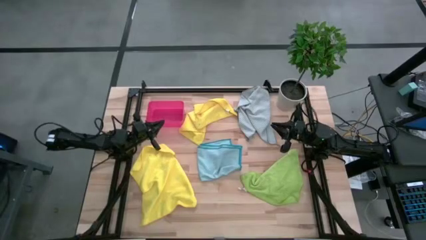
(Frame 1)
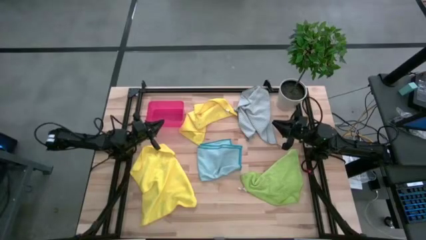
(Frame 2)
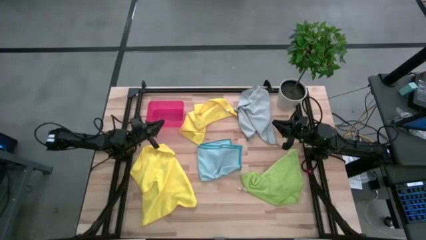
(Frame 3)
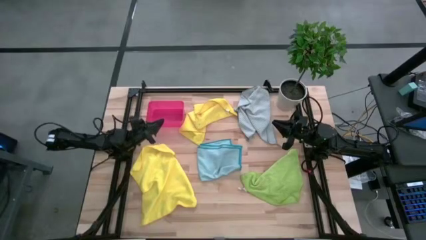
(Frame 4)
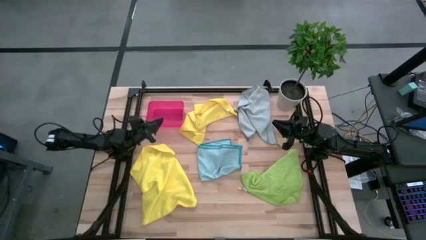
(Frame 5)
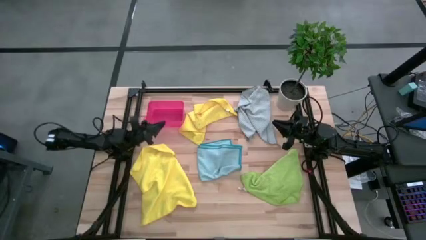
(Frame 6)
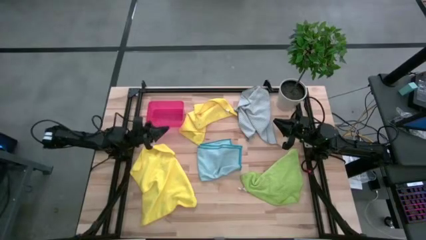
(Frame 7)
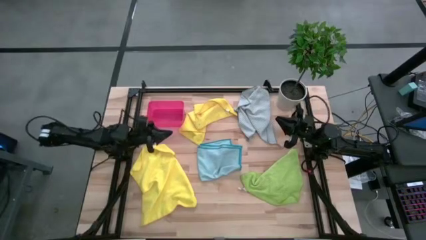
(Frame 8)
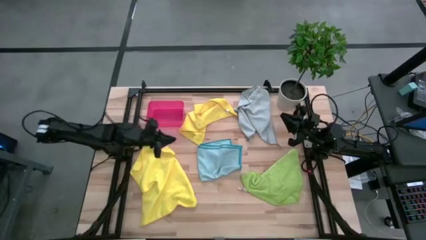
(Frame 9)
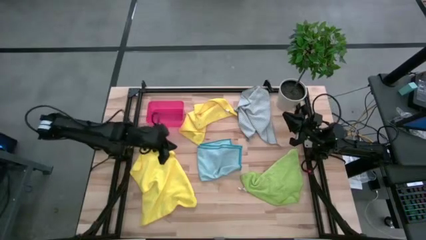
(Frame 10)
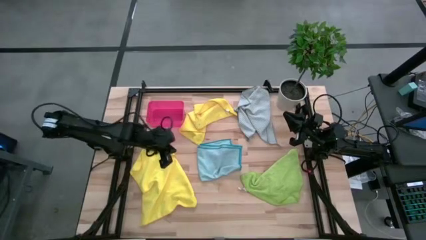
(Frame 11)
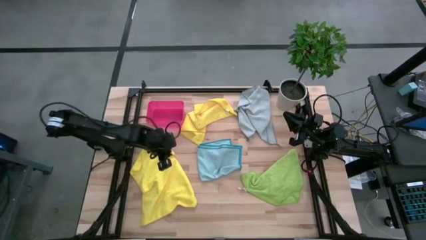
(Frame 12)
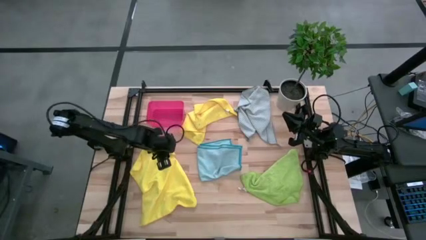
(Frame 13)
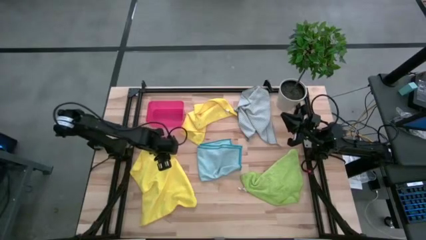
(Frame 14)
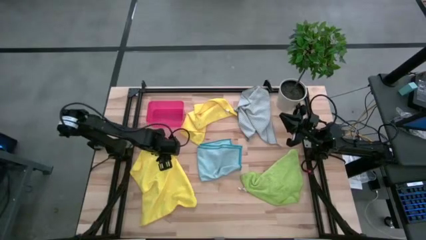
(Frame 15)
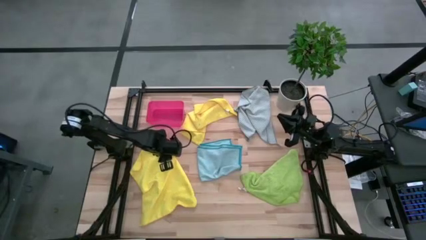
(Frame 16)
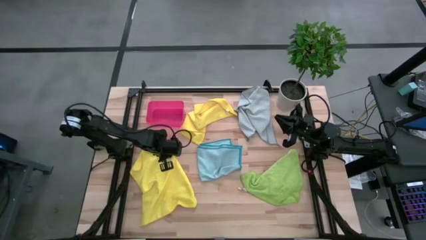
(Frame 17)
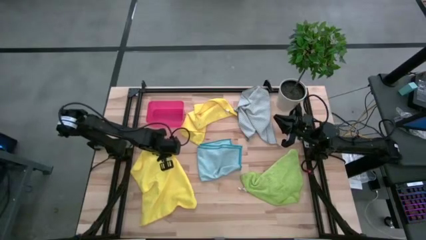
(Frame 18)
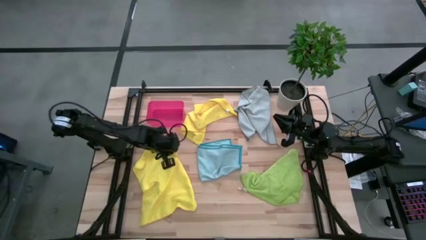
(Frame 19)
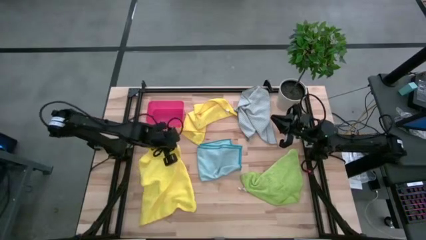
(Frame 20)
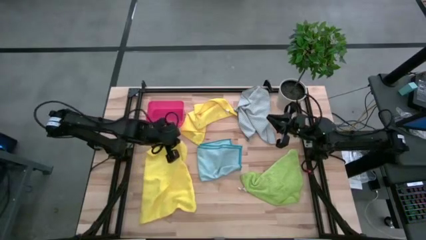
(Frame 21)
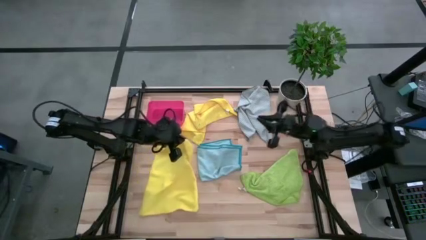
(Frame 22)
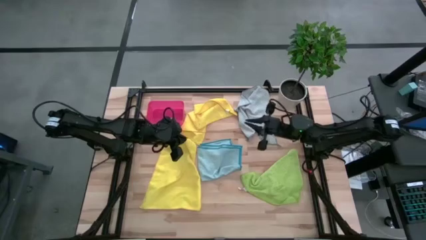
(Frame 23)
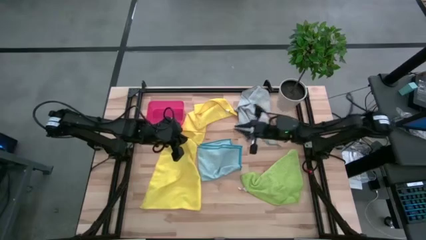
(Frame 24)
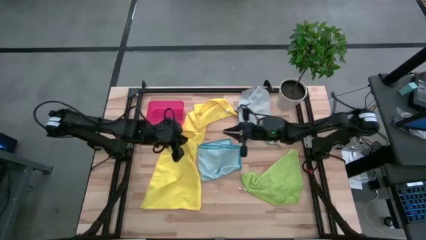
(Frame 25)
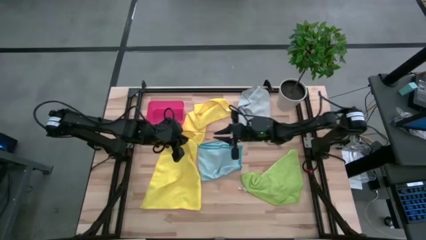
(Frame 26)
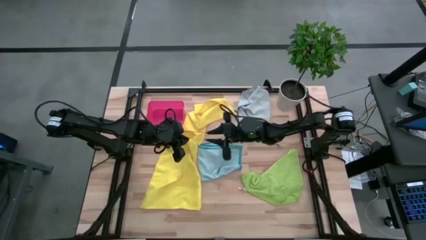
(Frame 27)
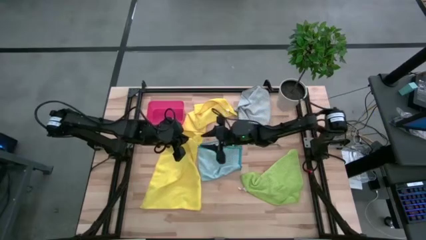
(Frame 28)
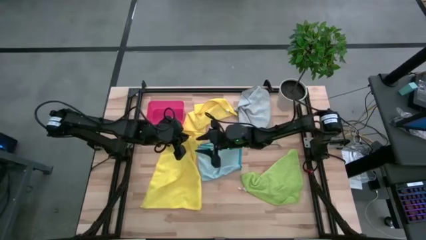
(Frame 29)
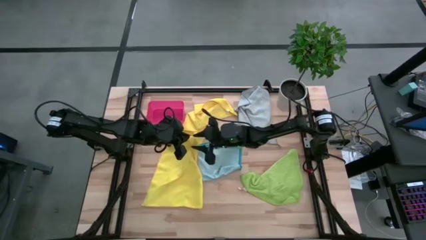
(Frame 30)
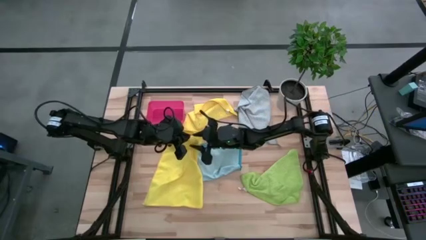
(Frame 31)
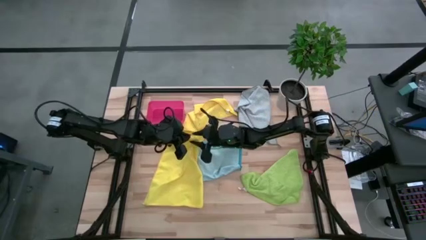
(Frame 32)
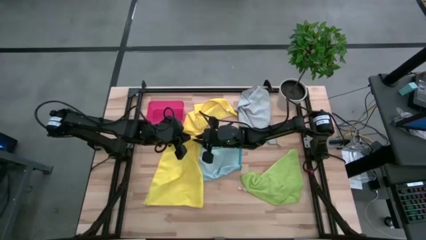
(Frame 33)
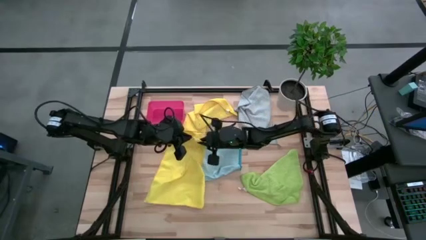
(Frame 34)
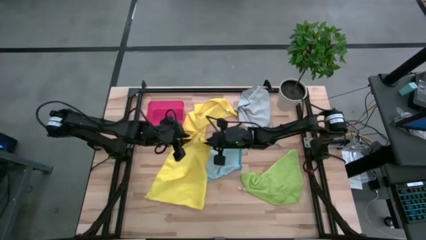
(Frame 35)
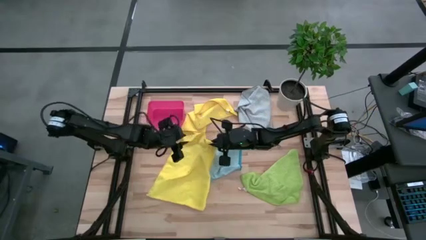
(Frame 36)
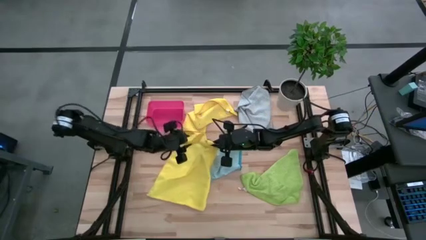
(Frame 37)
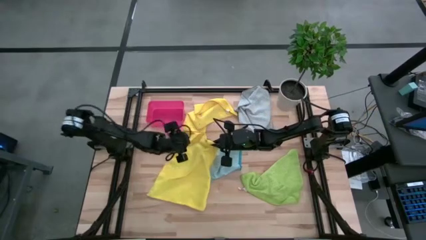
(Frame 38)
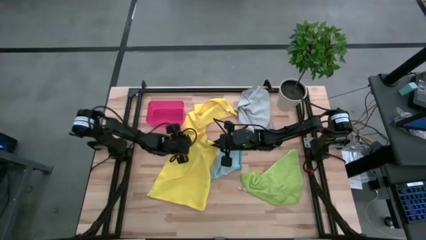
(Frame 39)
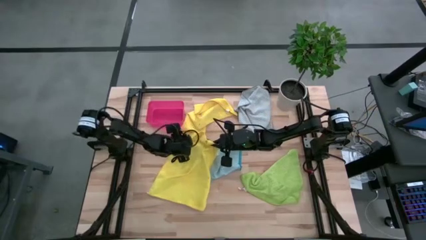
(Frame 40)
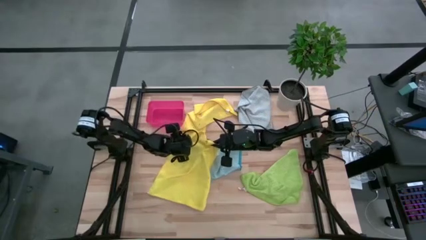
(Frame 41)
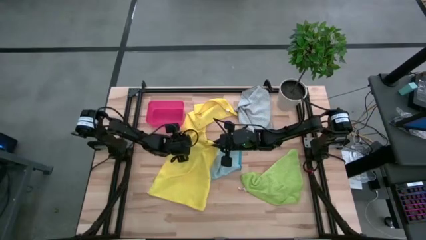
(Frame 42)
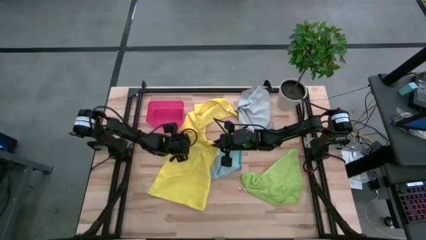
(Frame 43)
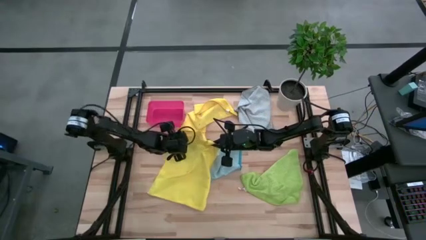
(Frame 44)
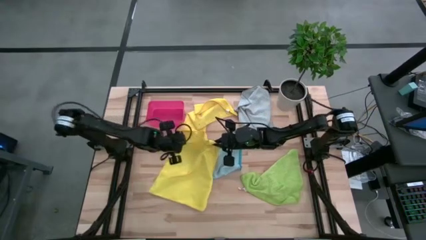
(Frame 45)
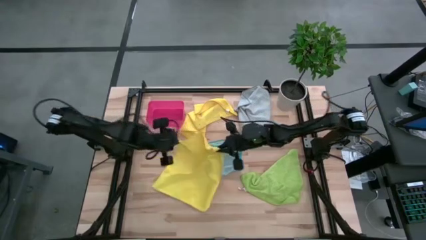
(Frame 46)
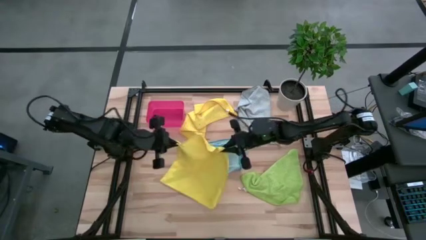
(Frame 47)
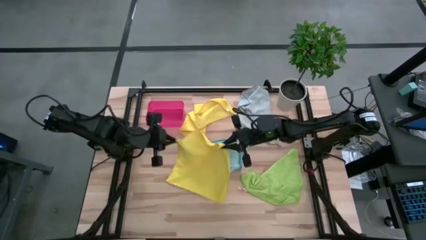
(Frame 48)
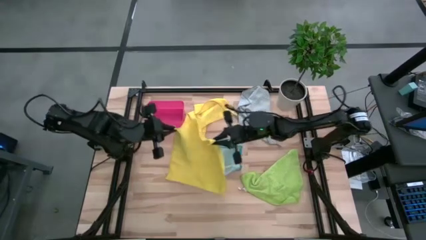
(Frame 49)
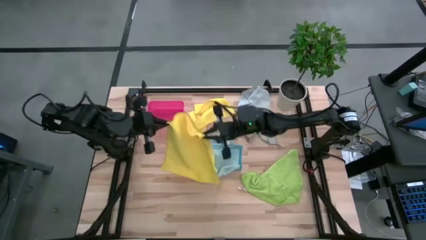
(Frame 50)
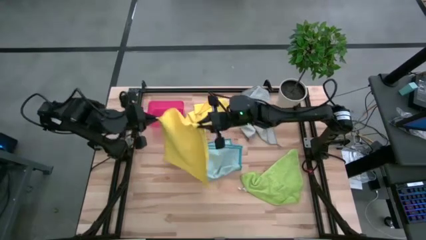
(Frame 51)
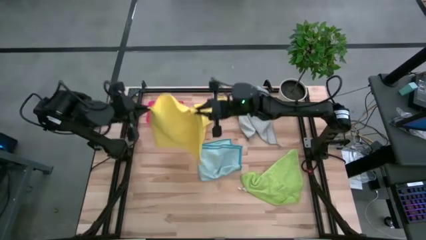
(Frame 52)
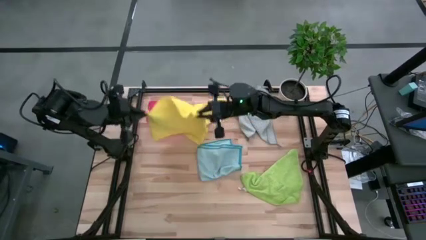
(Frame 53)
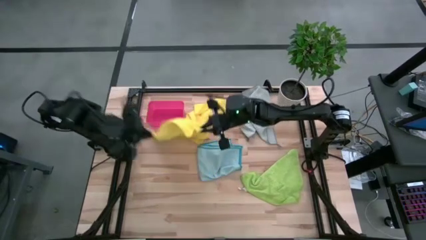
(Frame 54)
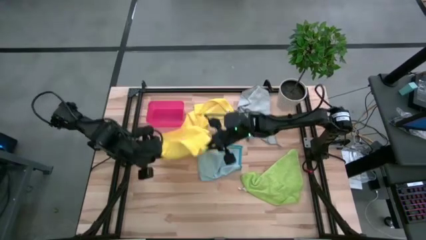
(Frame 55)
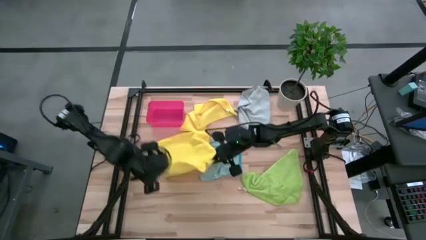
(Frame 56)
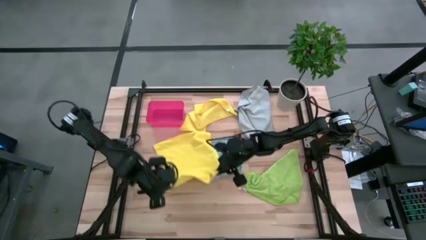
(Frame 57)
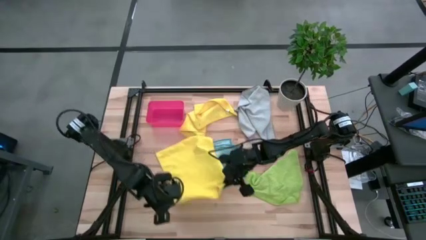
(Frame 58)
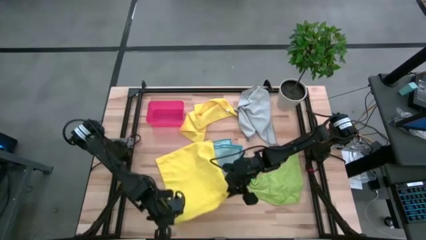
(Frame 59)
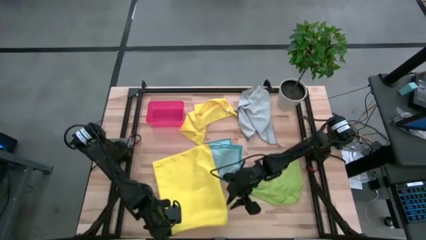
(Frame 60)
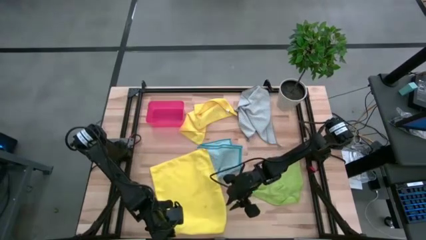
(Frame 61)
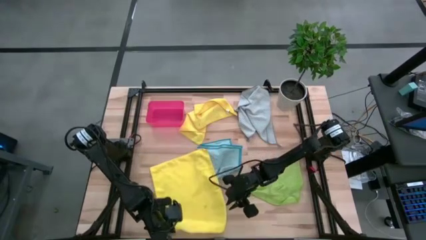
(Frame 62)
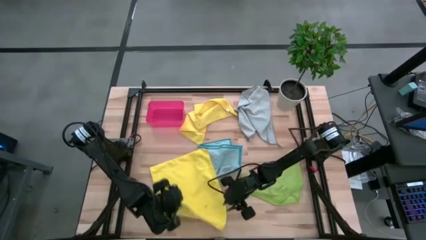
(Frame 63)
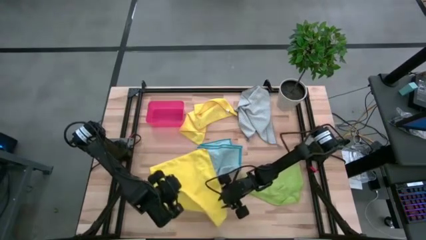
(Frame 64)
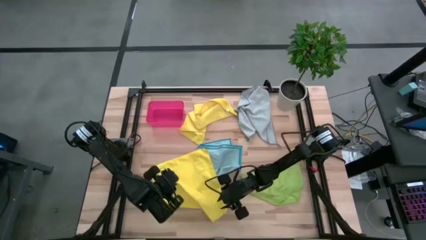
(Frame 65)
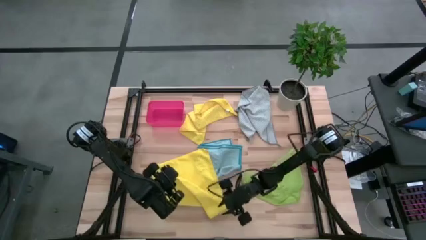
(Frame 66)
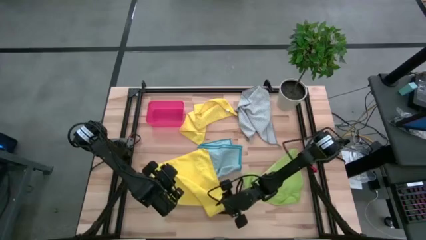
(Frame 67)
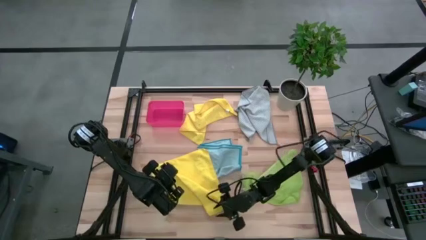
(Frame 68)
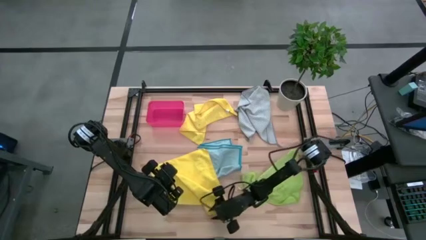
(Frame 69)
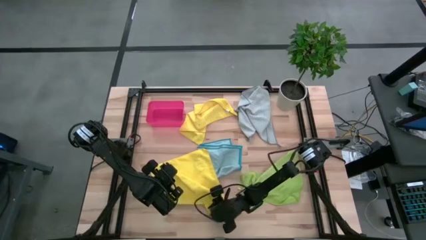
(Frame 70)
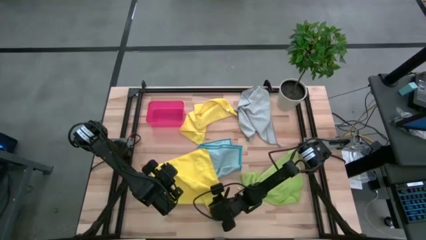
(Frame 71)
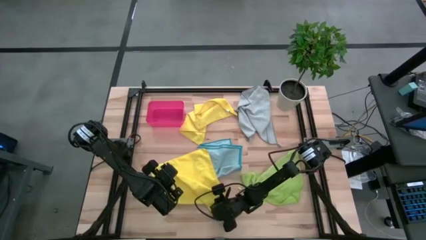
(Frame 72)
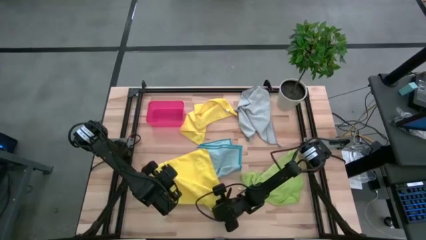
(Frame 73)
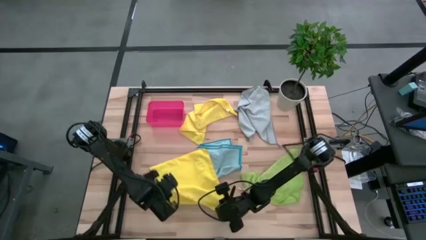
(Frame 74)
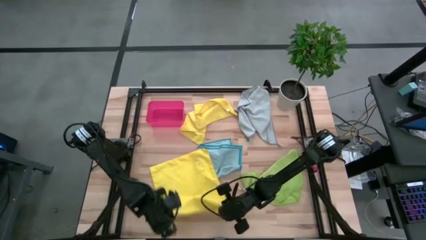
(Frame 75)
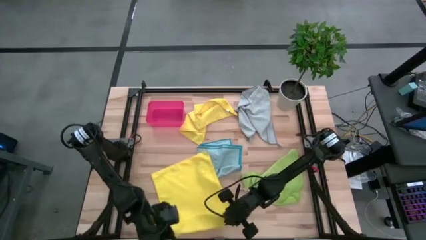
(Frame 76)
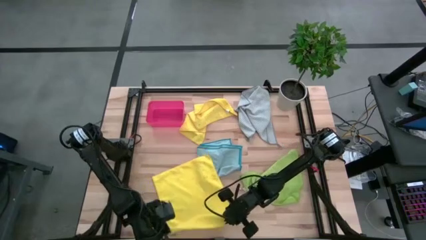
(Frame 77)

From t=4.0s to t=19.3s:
Task: Fold microfiber towels
Fold the bottom yellow microfiber cloth
